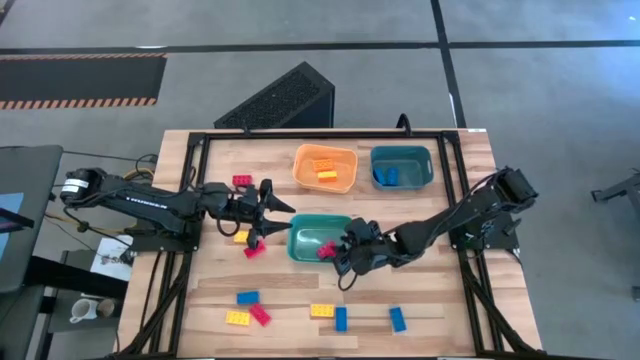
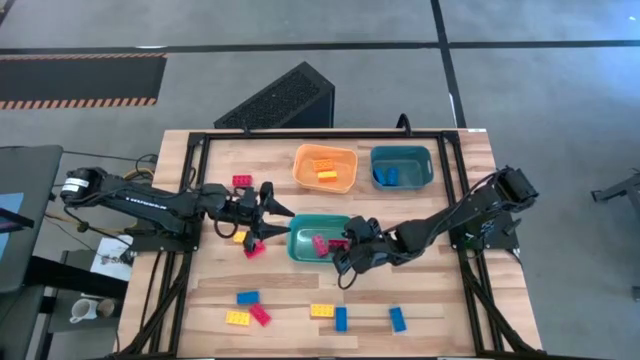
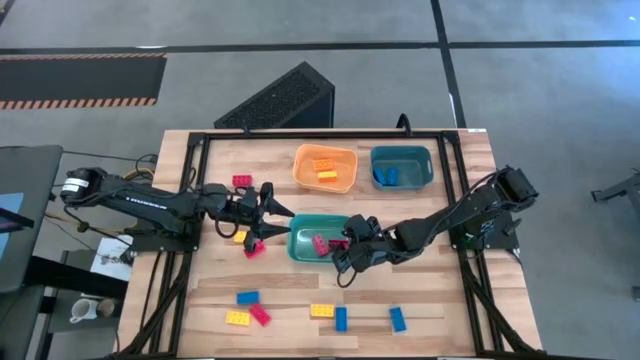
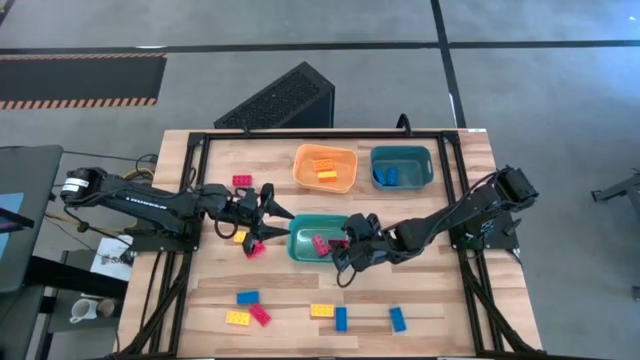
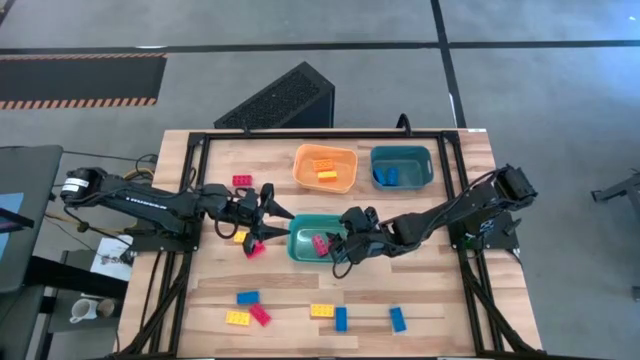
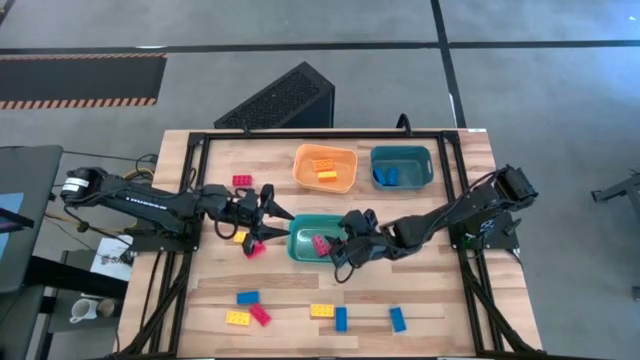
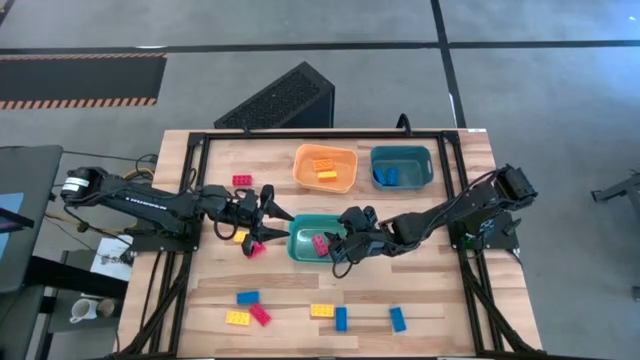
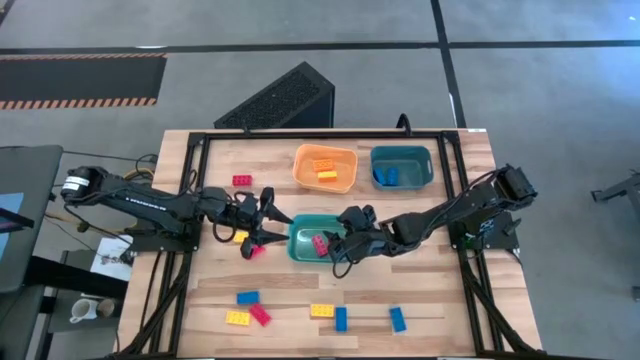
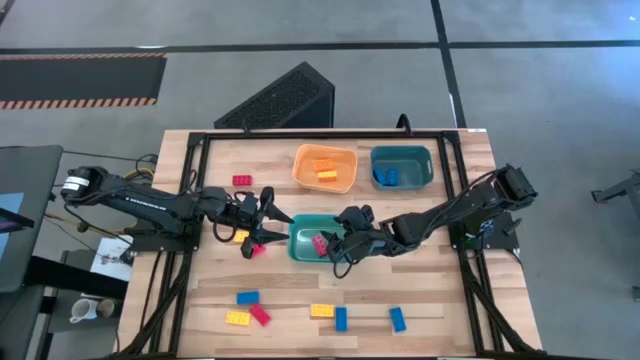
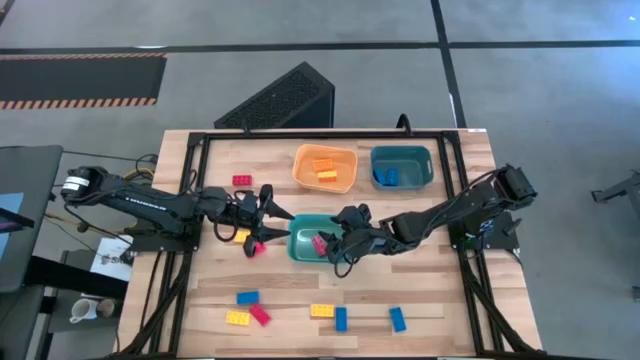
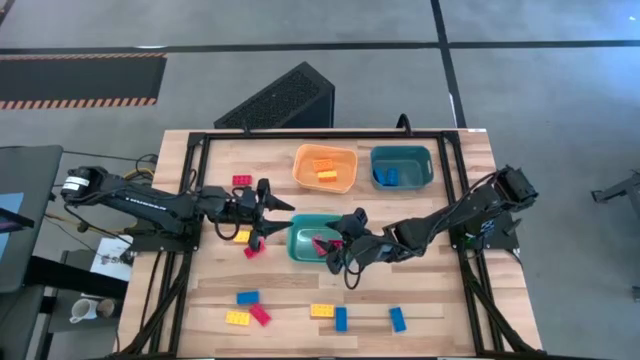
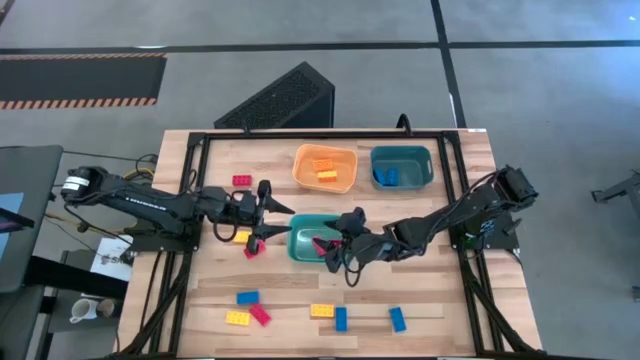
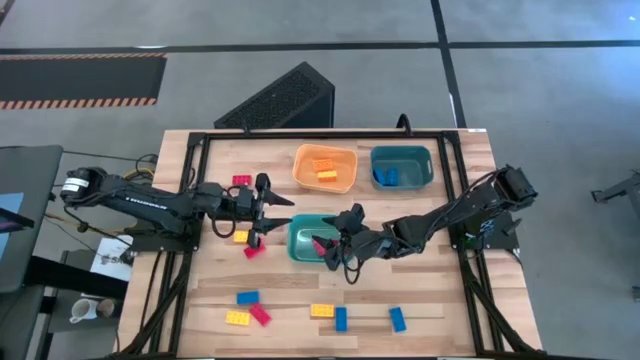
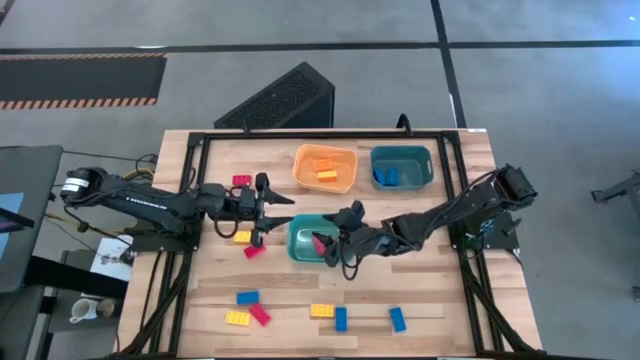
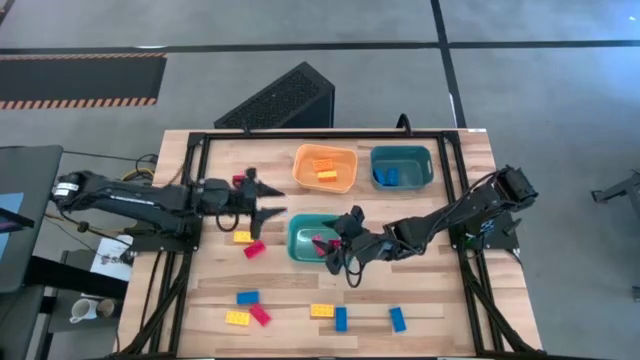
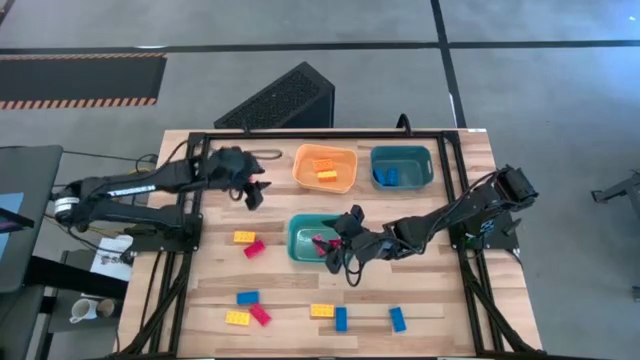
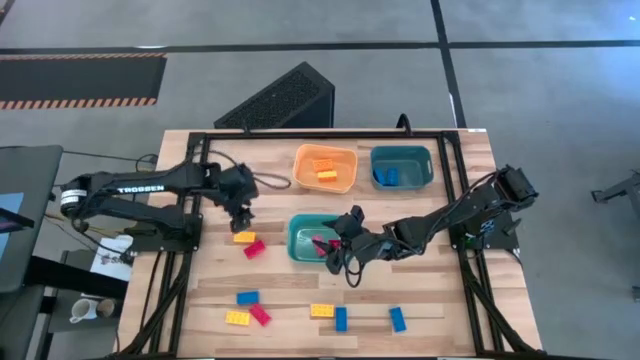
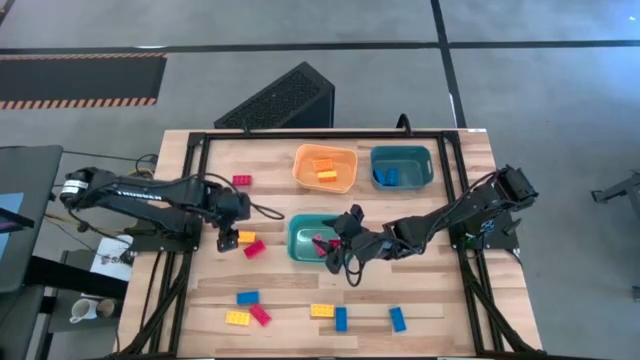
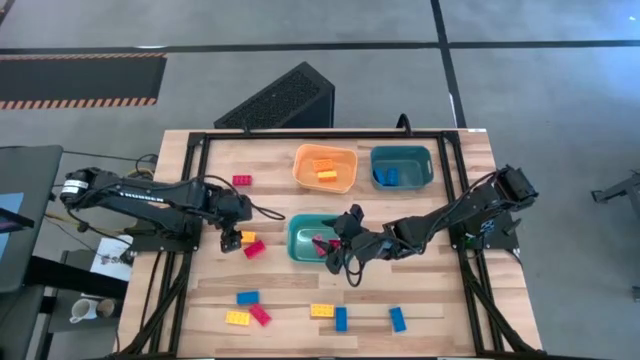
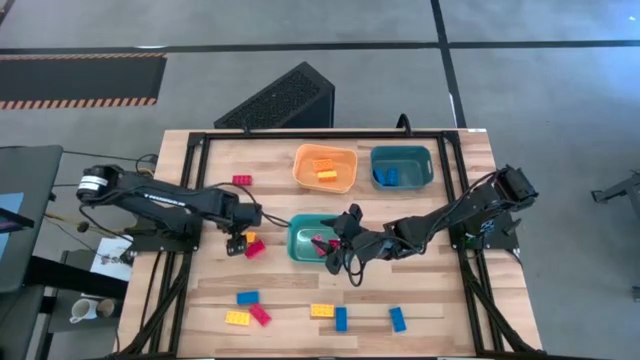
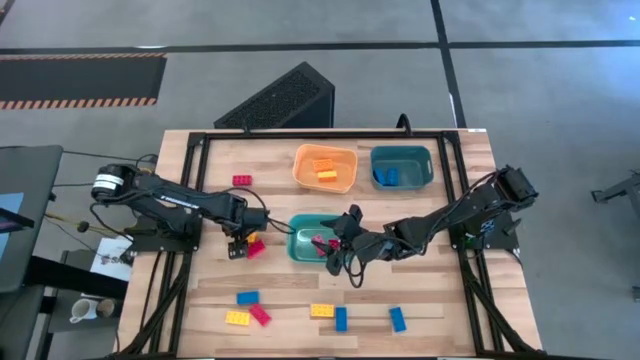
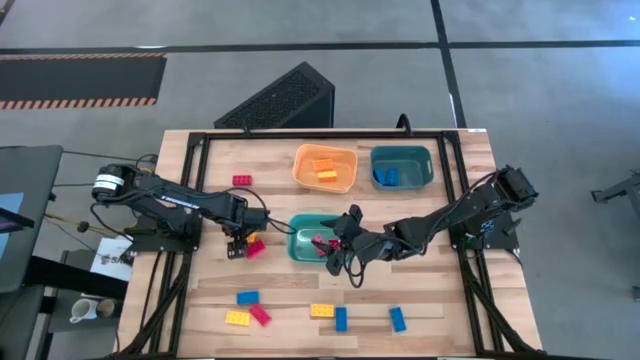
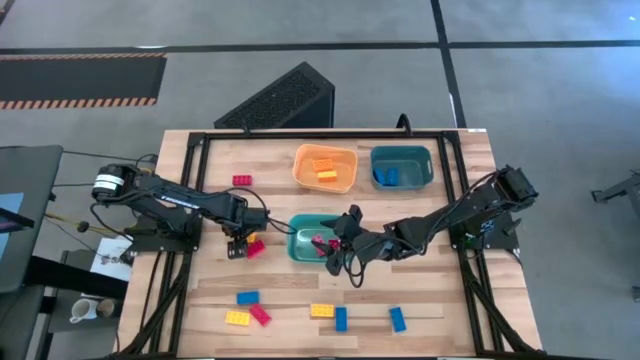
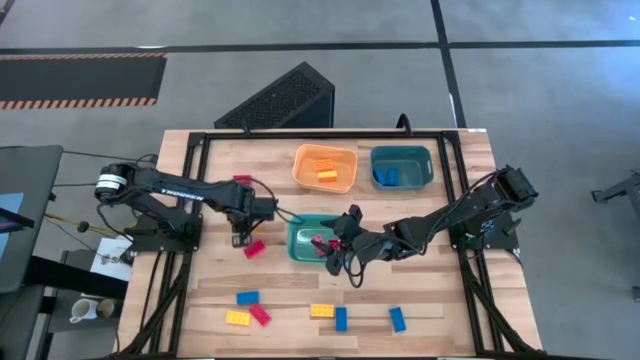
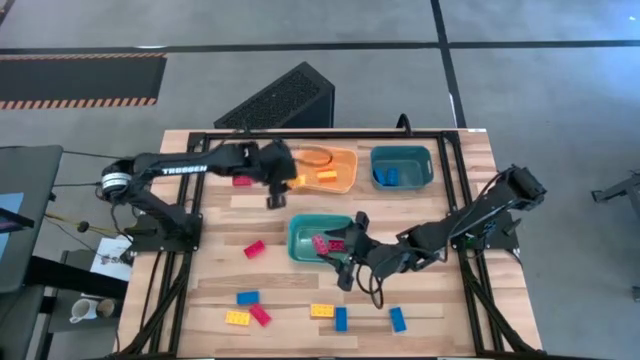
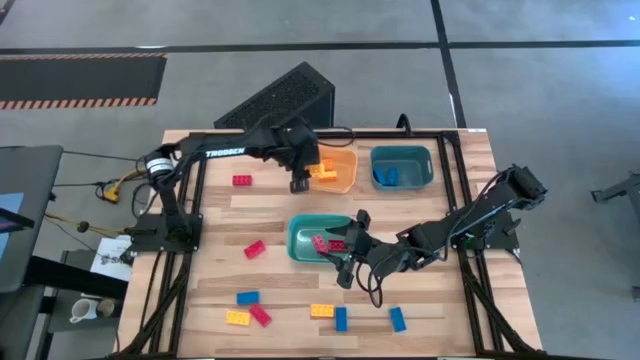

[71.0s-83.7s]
Task: Sort & place blocks by color
Put the yellow game piece into the yellow bin

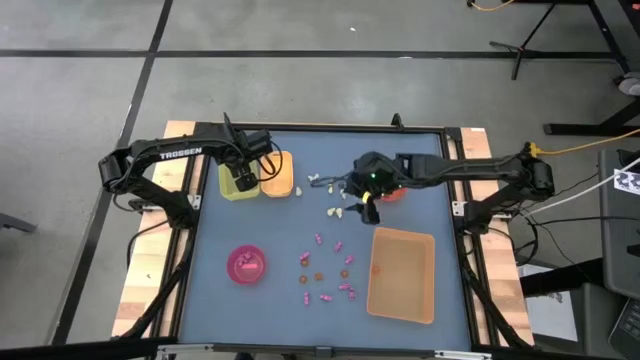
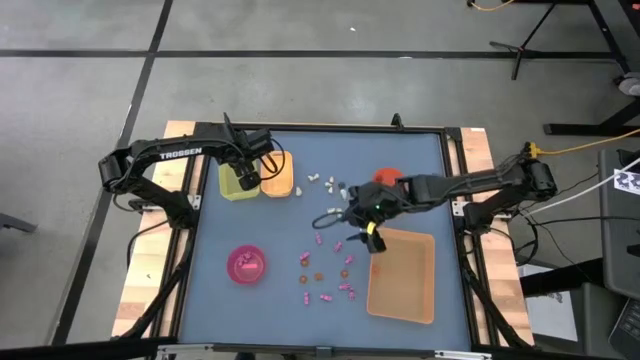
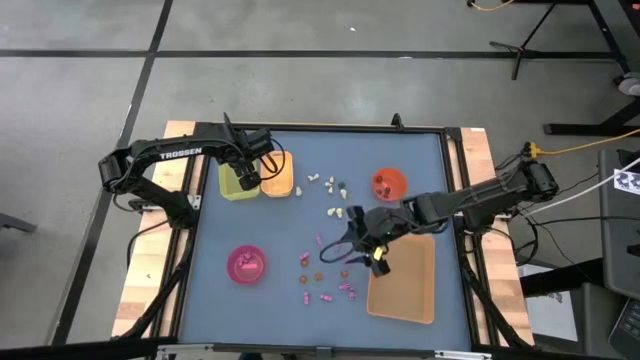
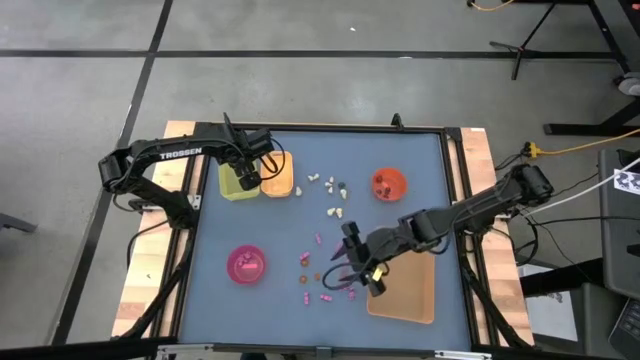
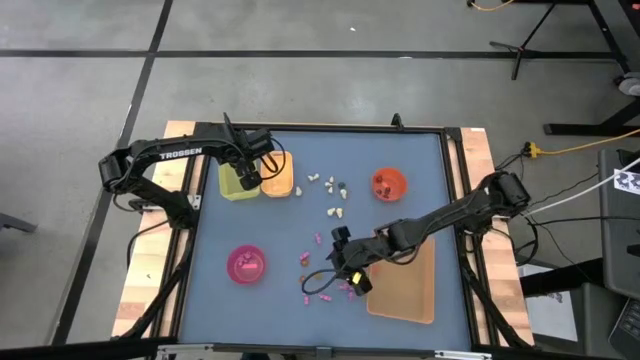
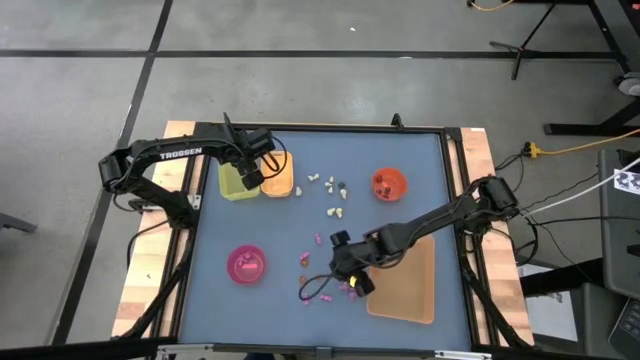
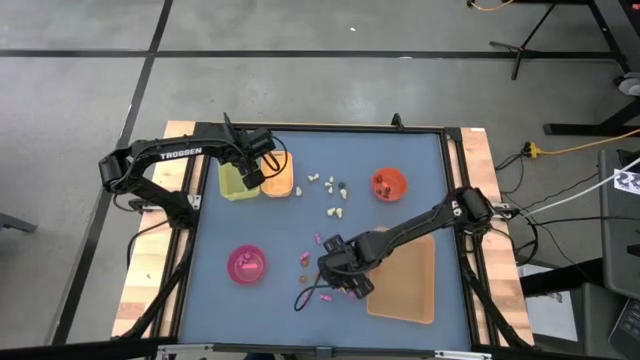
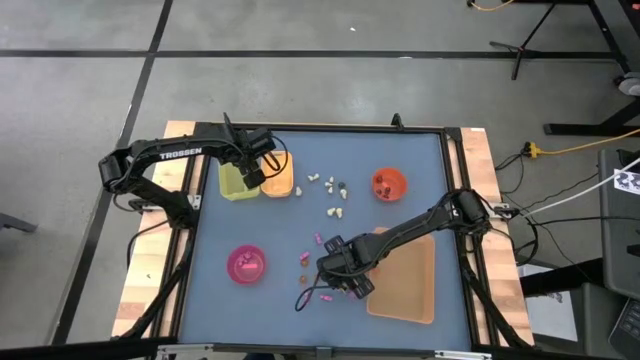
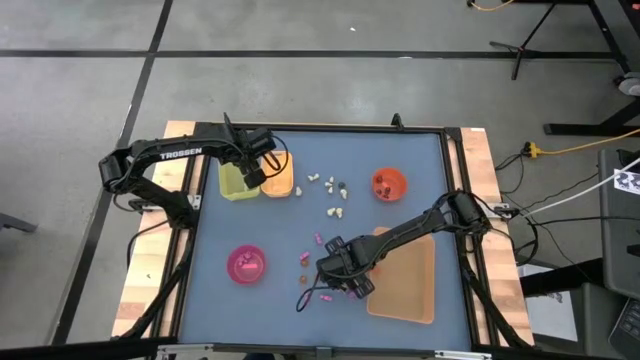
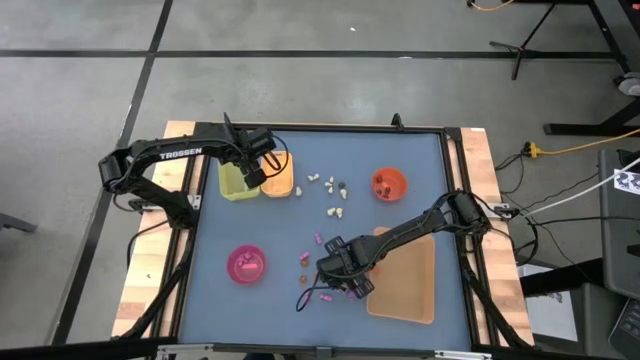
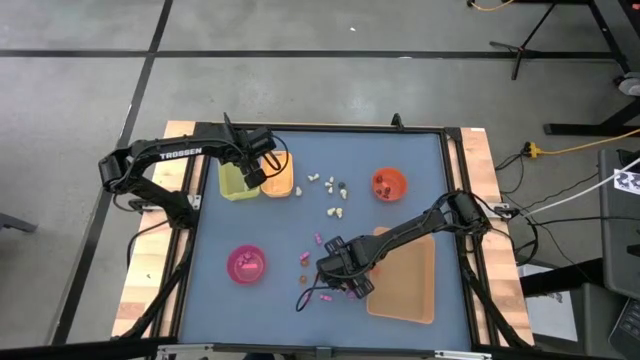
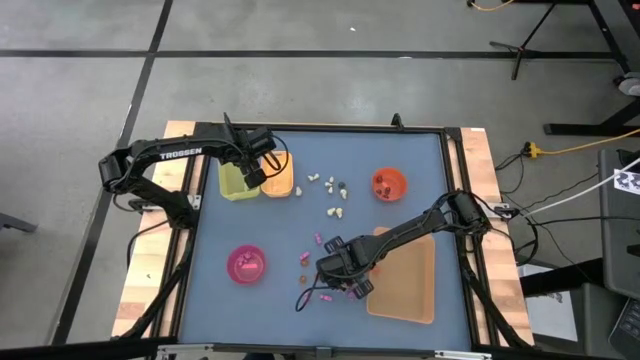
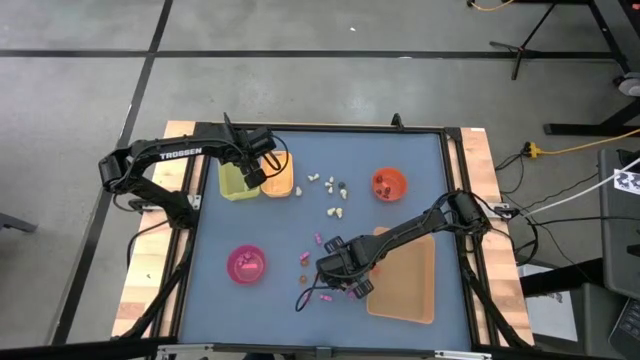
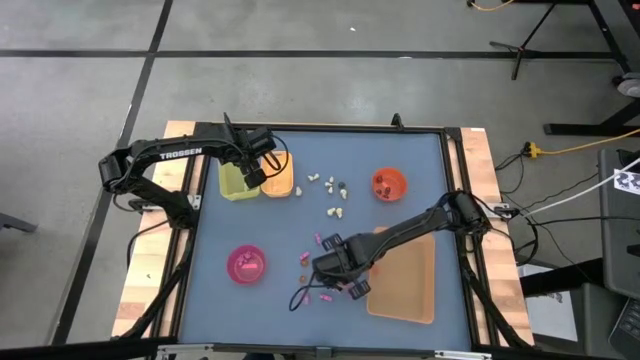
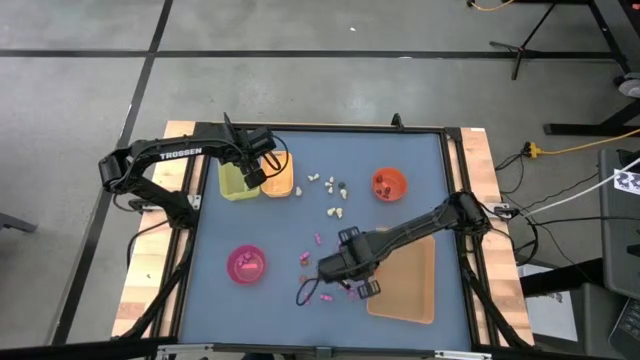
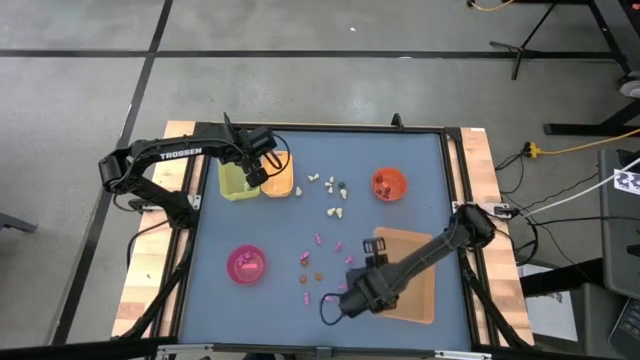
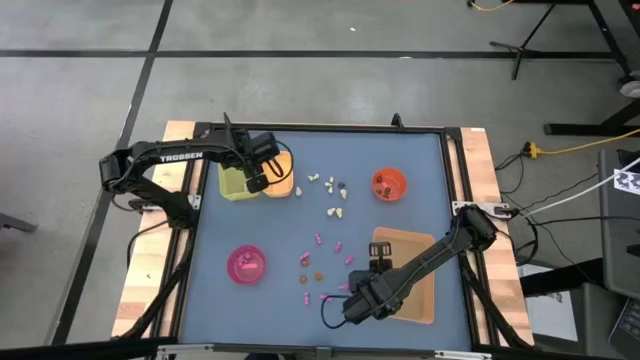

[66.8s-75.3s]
Task: Sort Halloween decoration
Put the orange pumpkin toy into the orange bin
